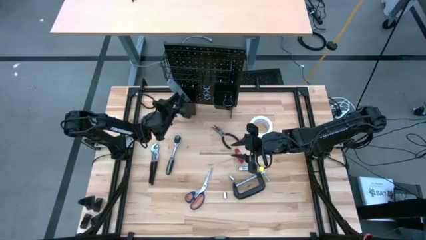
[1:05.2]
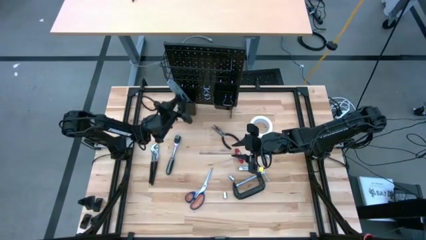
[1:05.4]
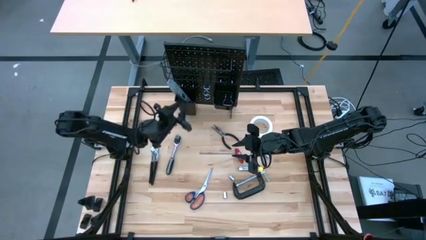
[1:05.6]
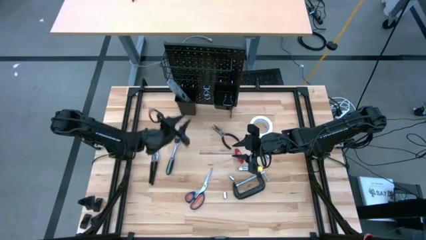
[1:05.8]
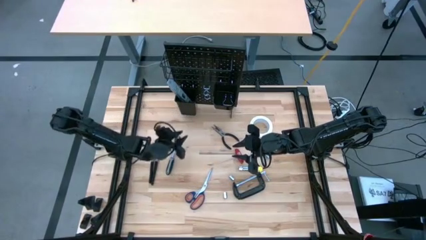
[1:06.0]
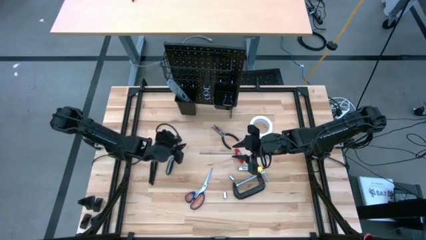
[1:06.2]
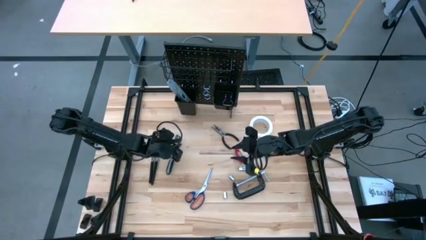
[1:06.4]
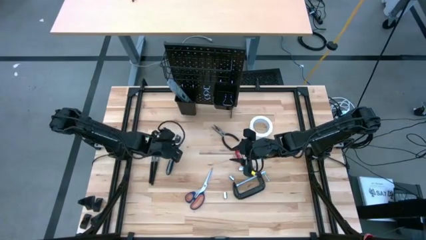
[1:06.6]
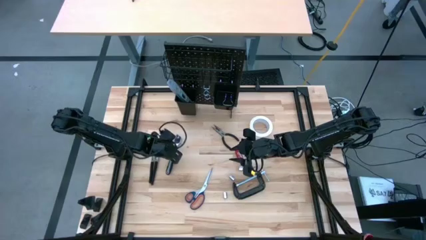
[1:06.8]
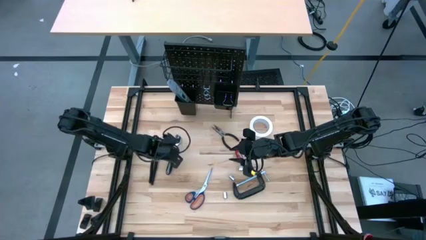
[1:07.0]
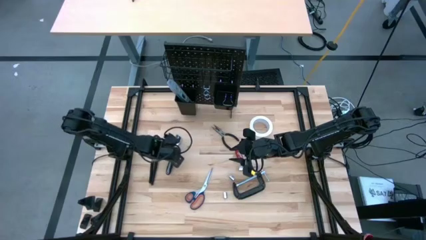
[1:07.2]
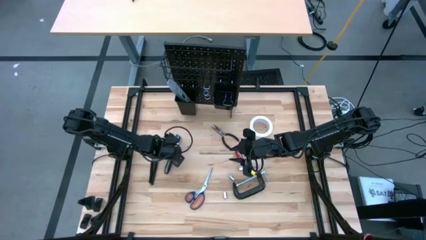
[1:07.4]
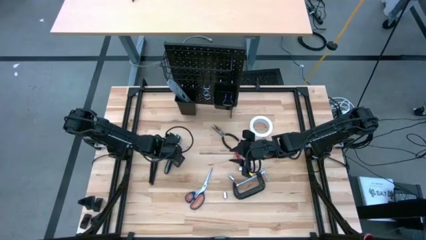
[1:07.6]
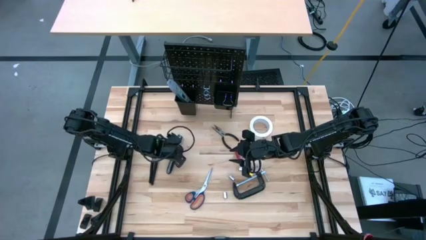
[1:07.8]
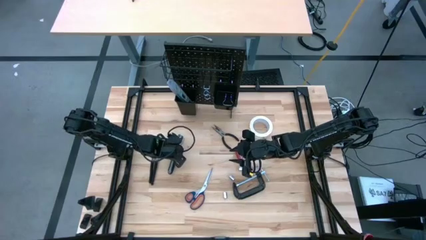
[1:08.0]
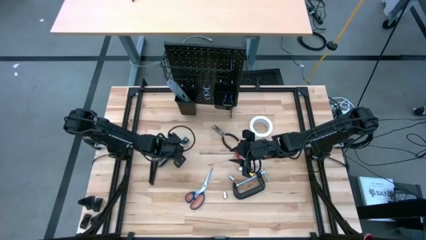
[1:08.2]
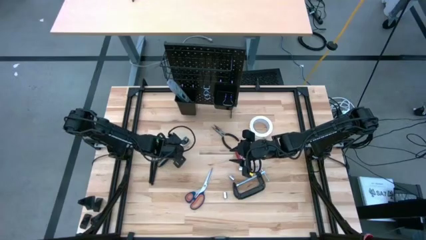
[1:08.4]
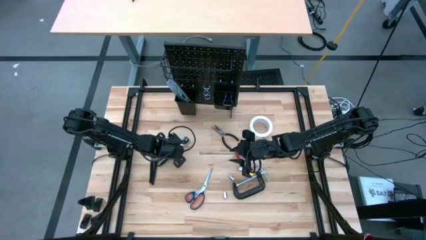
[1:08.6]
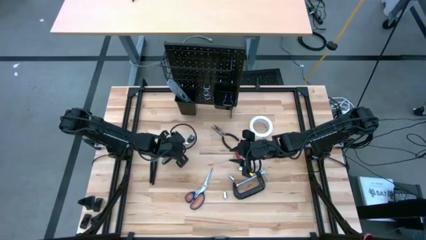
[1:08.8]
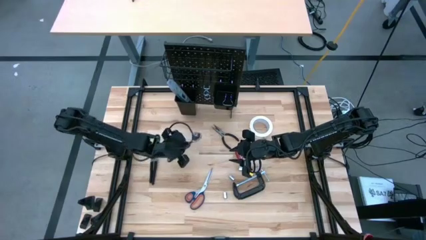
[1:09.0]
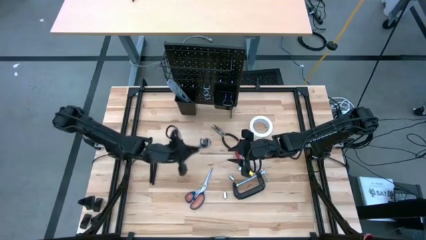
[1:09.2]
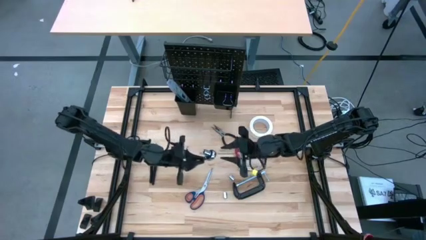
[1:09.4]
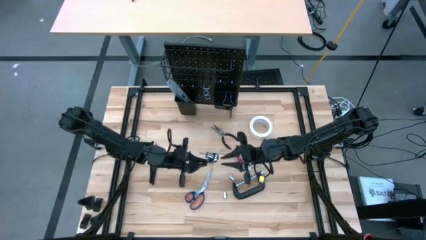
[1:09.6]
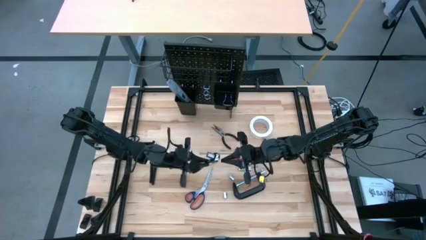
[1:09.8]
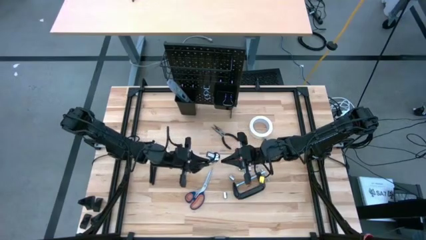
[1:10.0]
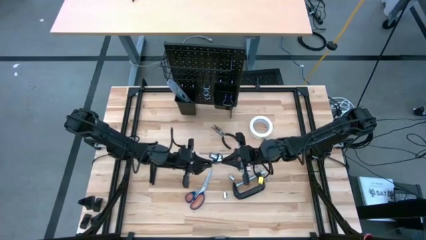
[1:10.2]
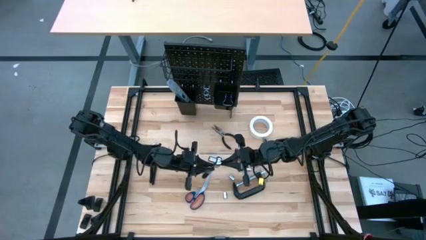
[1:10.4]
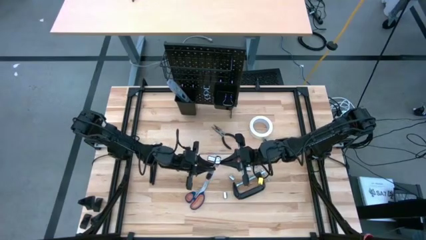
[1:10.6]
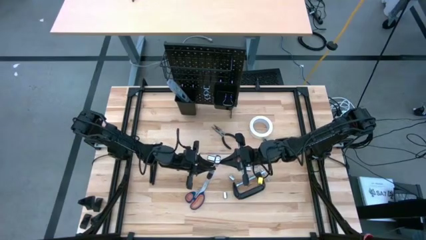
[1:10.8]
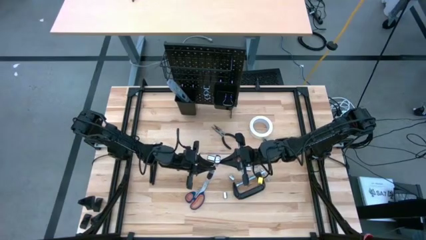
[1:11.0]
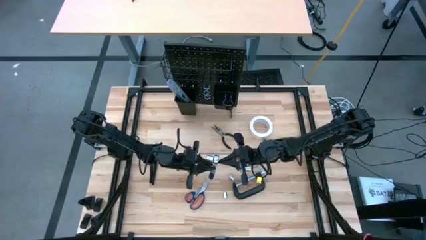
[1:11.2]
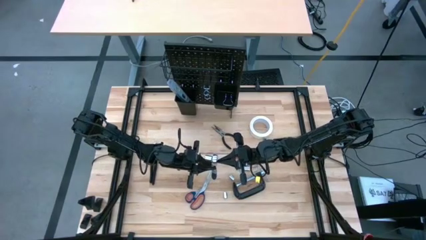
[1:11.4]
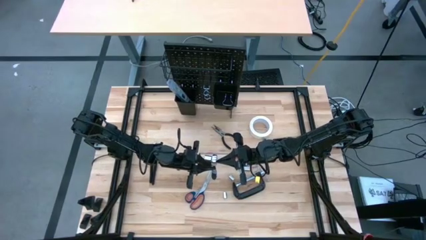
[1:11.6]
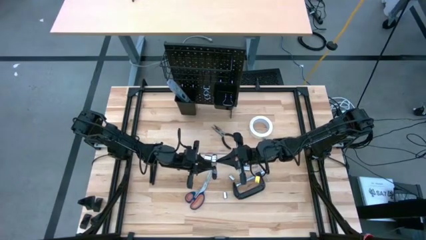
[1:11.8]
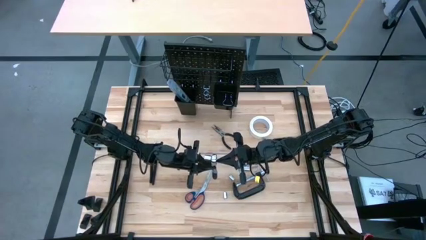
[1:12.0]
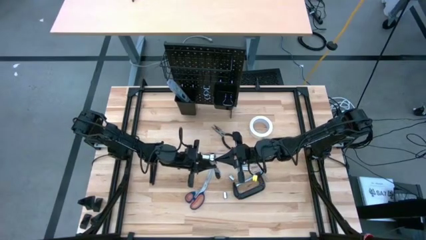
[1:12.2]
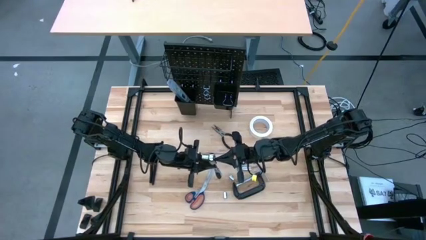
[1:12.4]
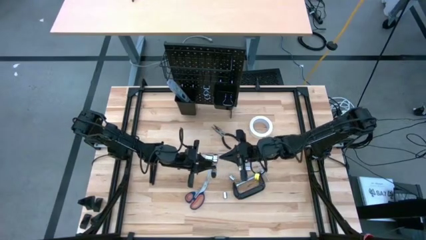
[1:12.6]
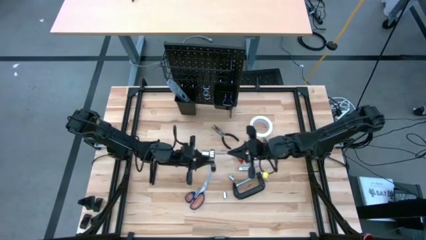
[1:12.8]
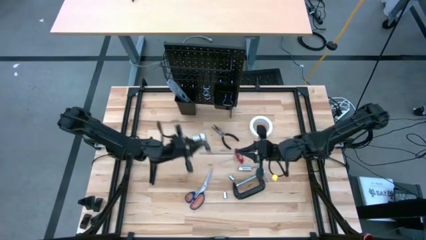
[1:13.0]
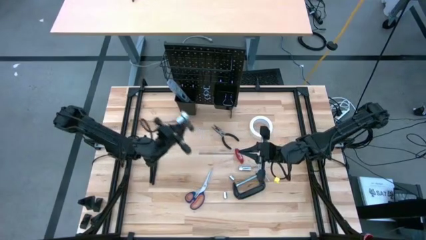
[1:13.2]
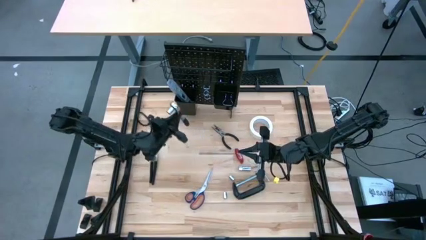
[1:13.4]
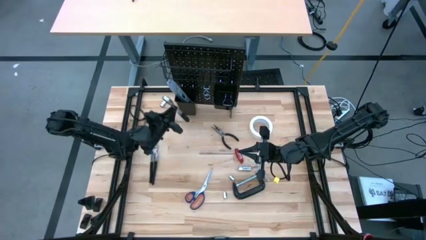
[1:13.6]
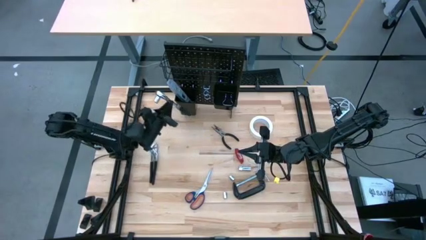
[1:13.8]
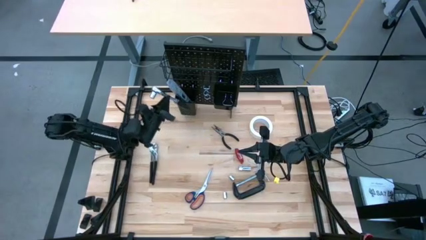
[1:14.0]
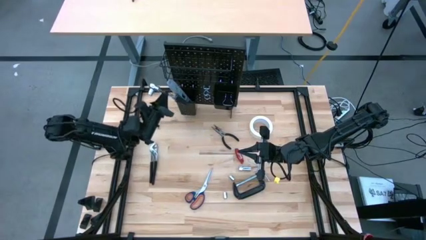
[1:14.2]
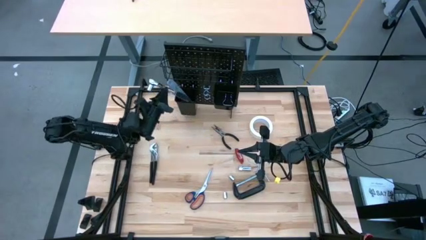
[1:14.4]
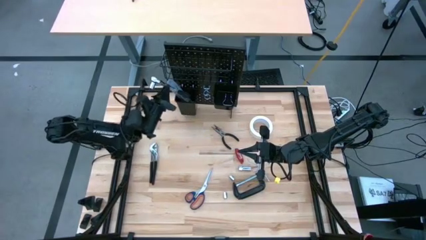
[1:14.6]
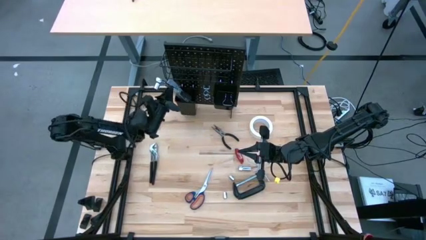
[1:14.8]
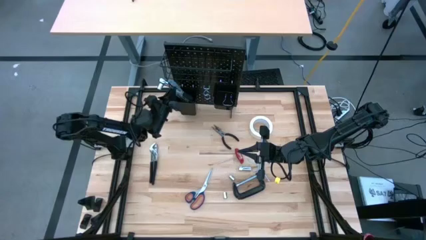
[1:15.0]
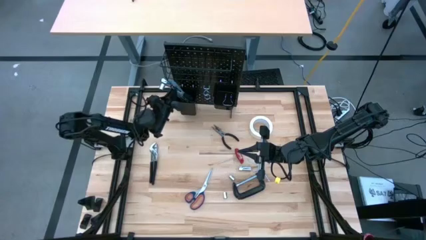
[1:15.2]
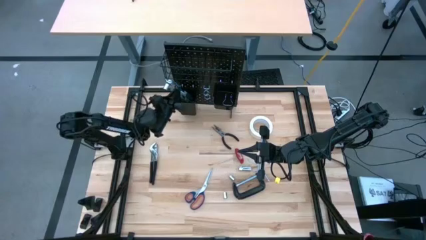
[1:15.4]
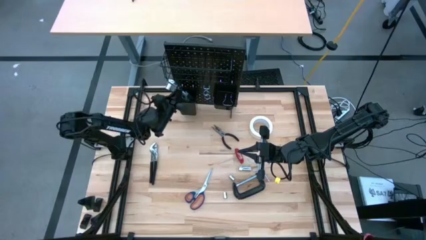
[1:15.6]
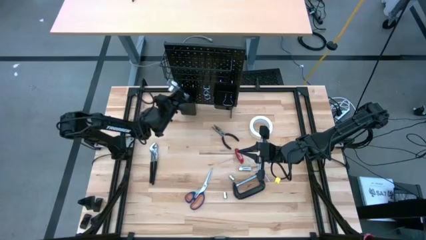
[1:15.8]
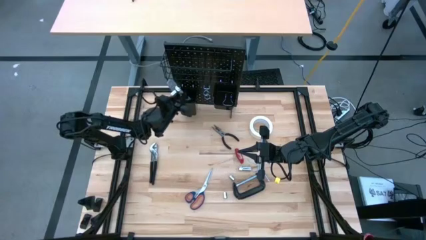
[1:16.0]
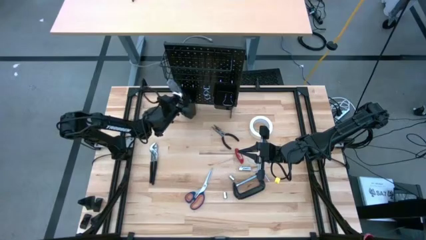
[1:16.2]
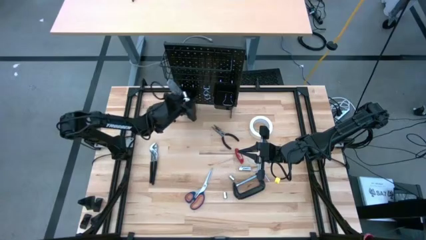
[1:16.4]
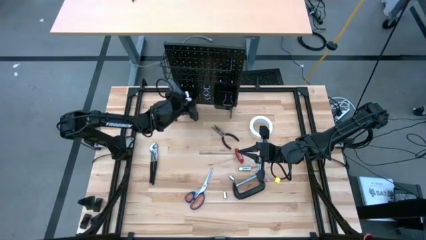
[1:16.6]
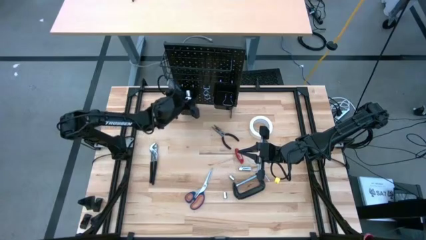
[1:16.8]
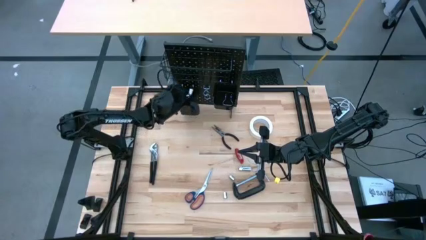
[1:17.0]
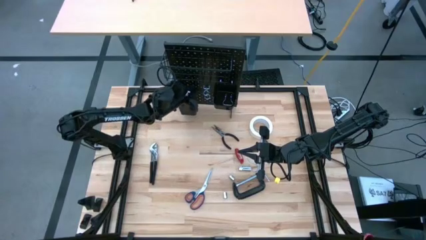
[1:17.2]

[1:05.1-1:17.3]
Task: Hang tools onto peg board
Put the black ratchet wrench into the left black bin on the peg board
